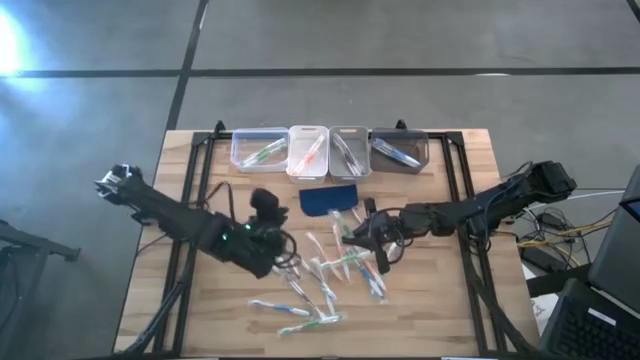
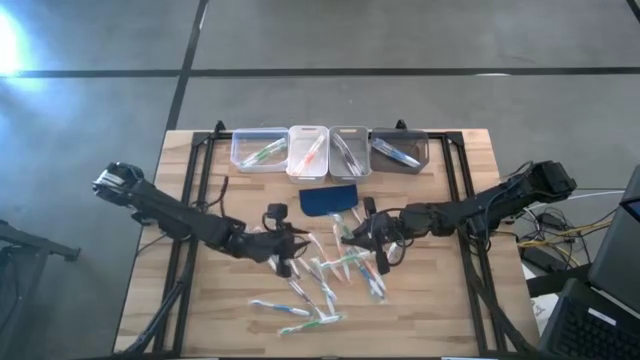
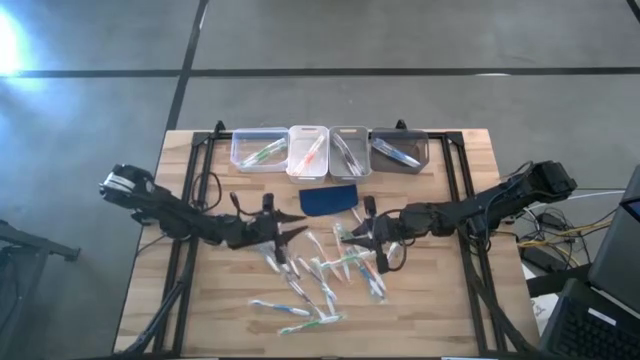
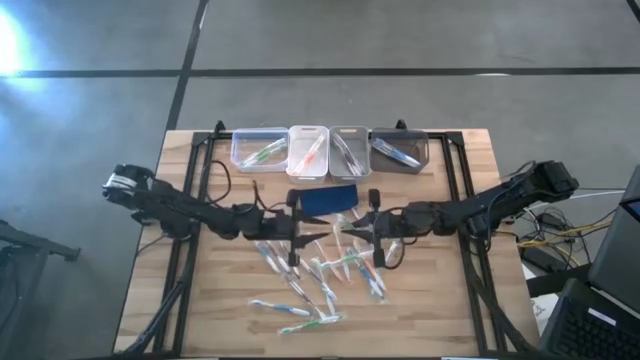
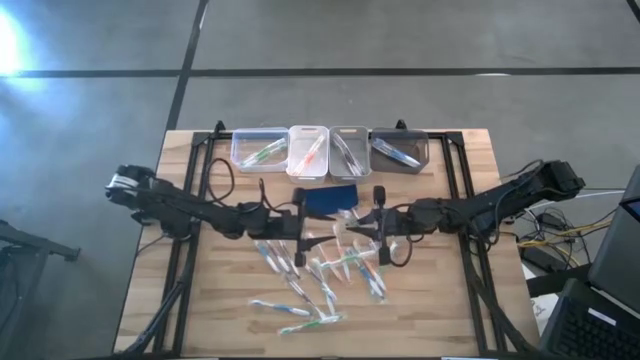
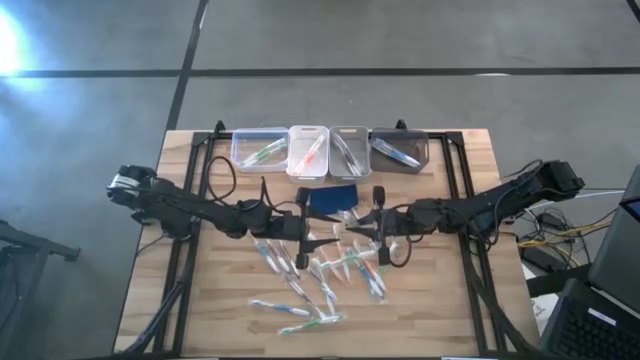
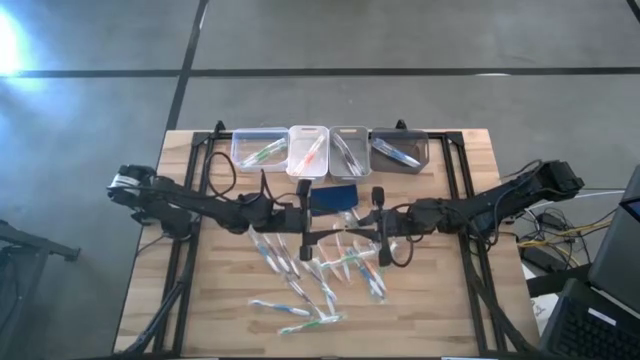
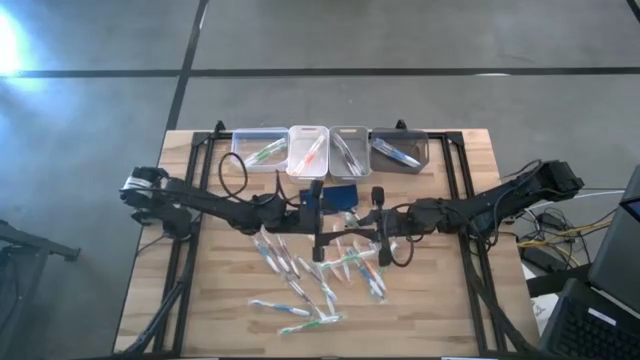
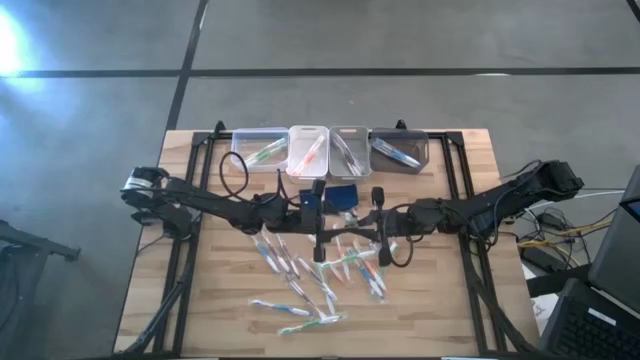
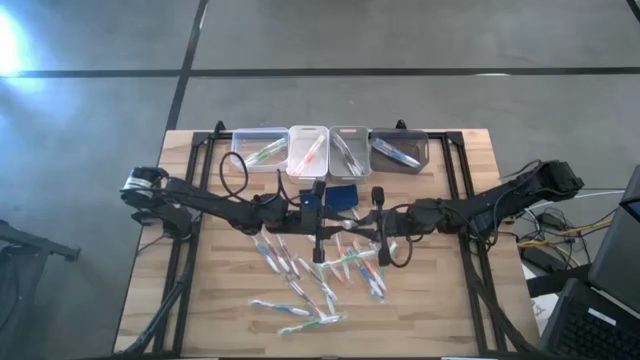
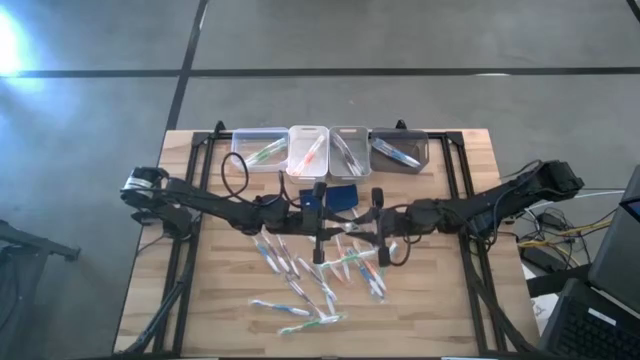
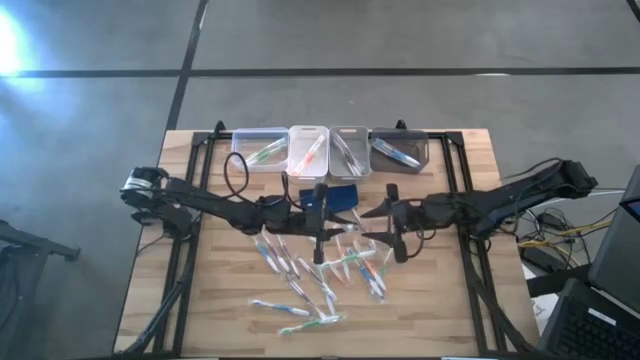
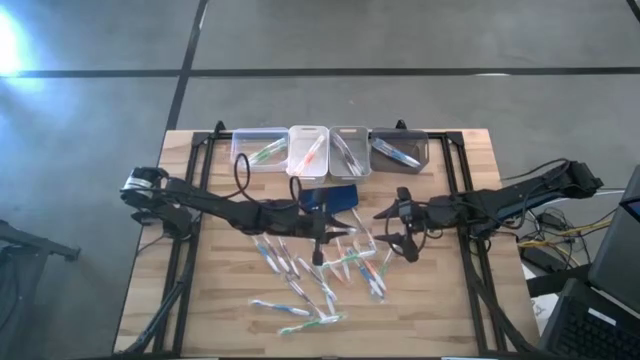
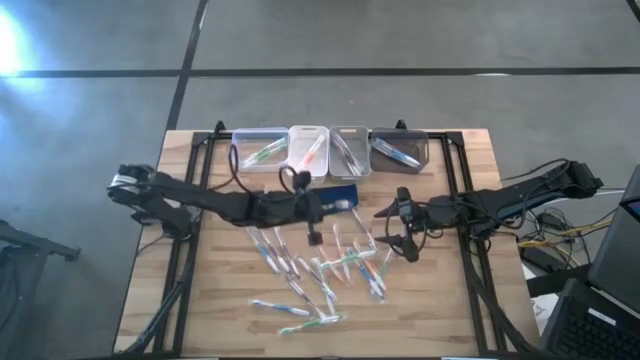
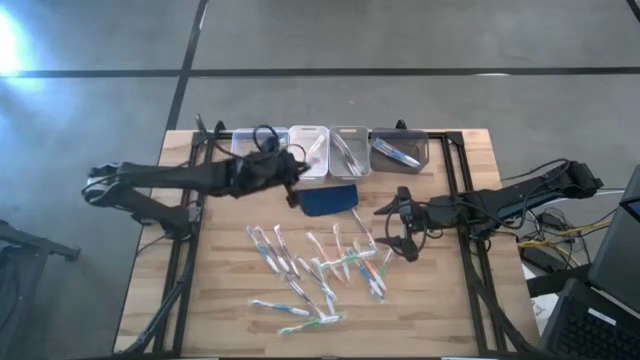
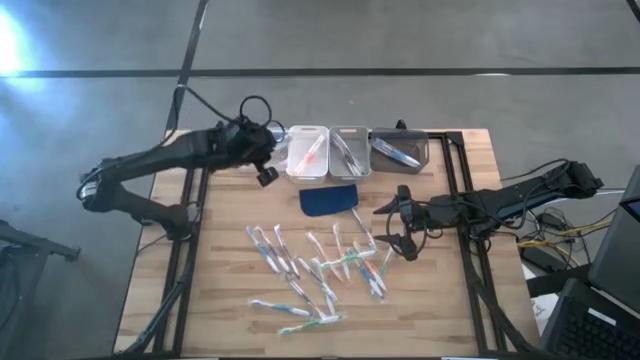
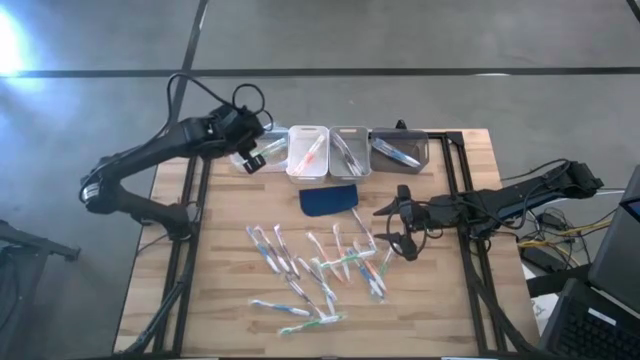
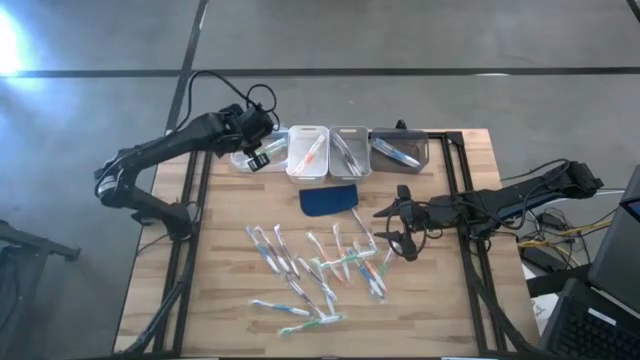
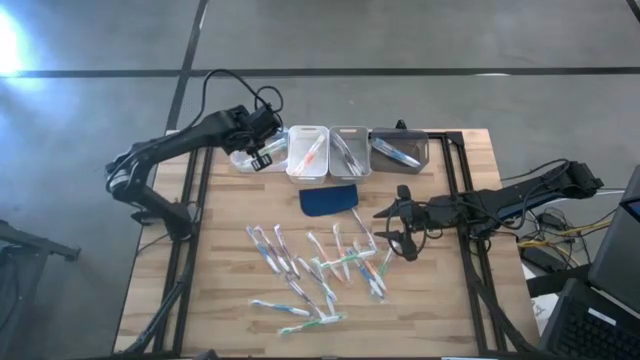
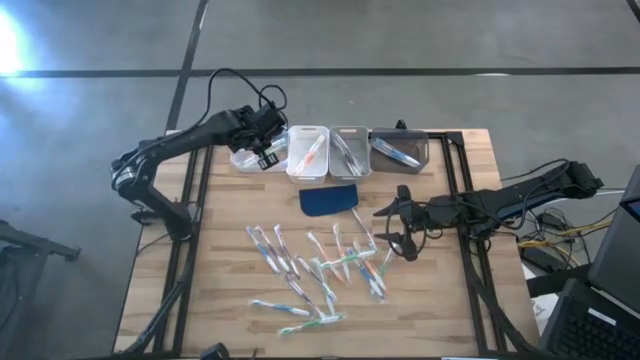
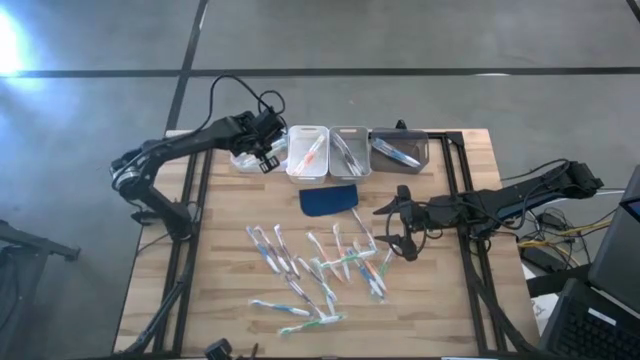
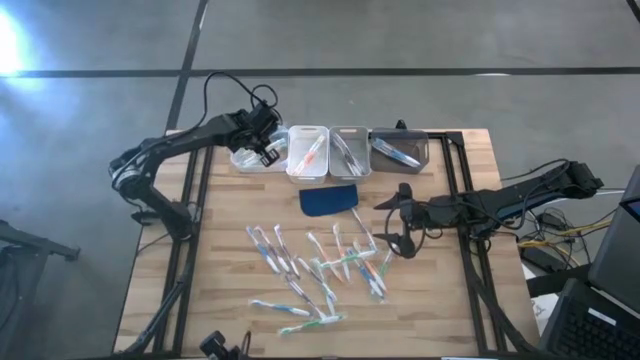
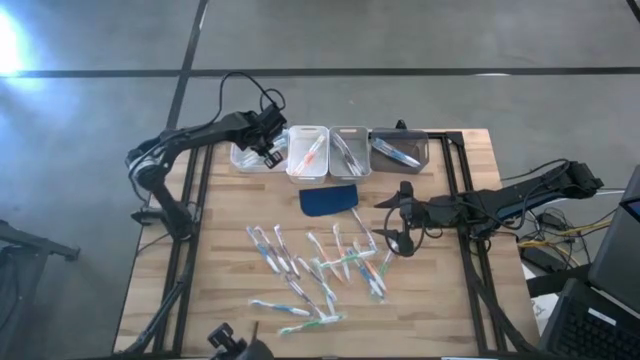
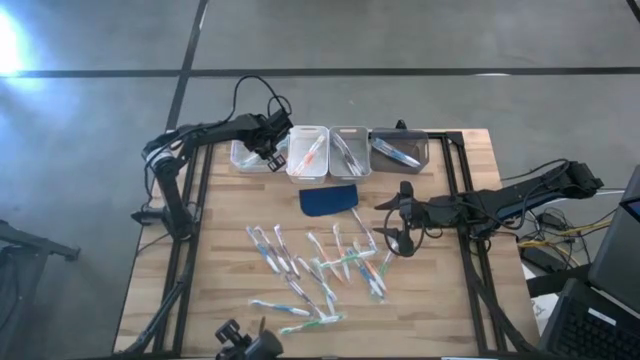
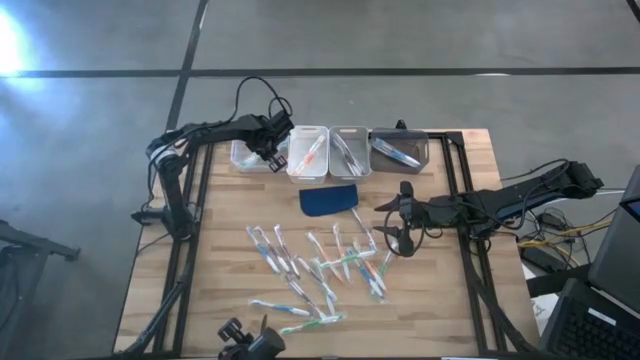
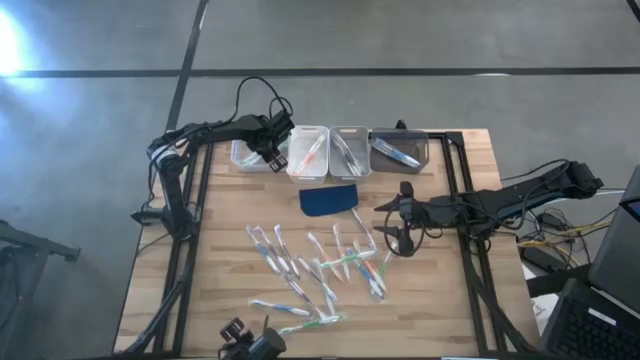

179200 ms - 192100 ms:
Task: Pick & Place Toothbrushes
Put the green toothbrush into the transparent bin

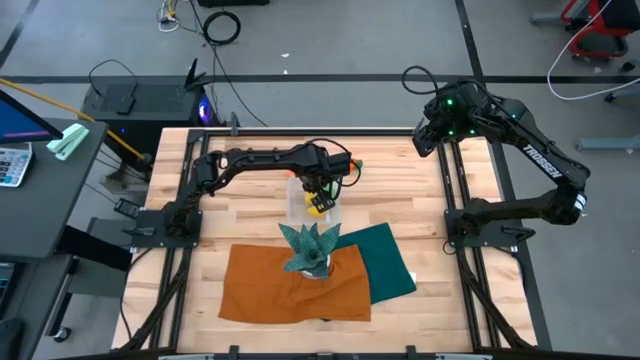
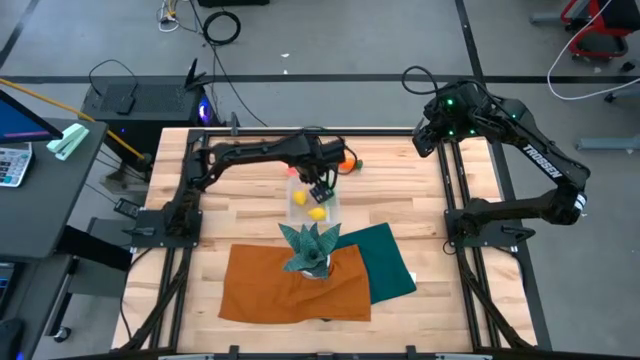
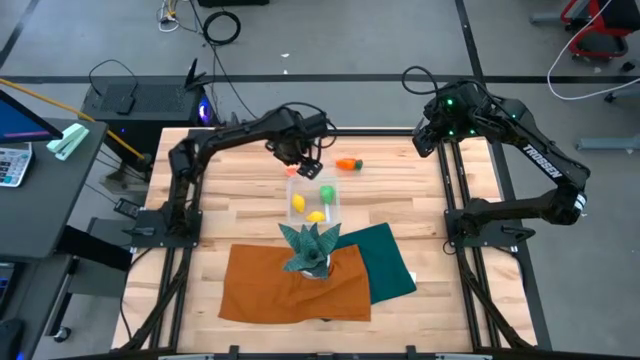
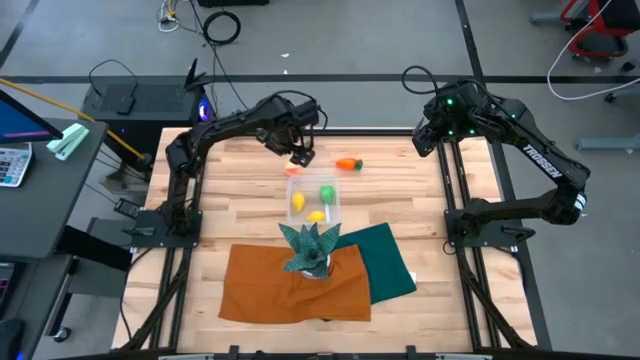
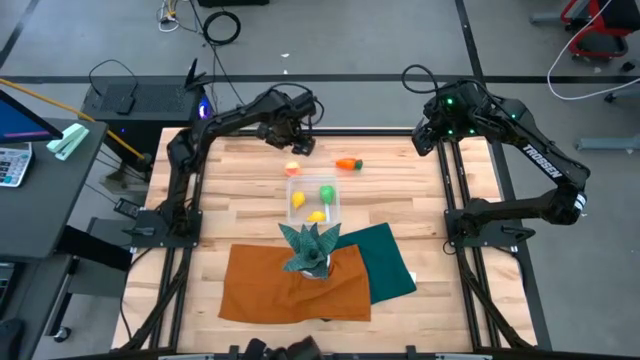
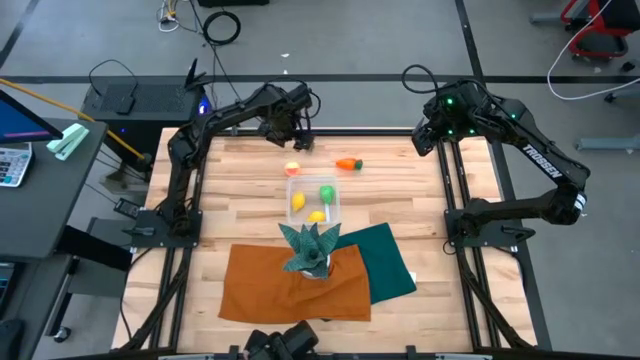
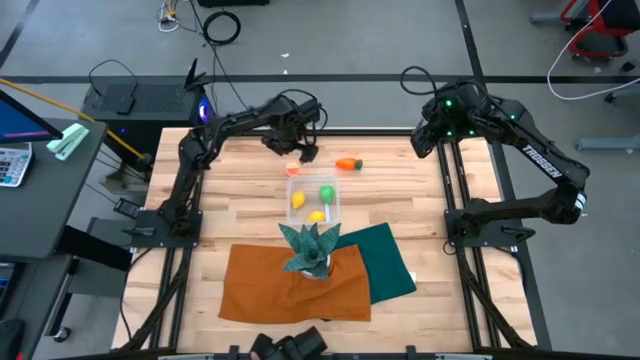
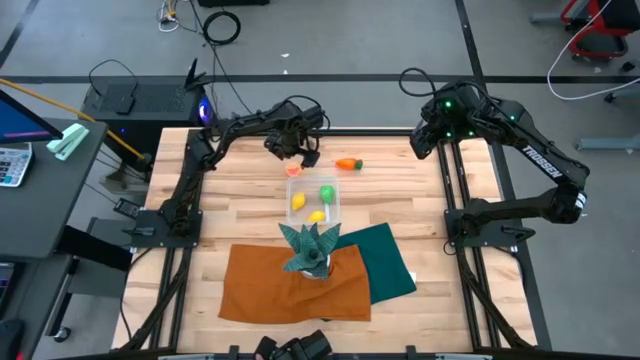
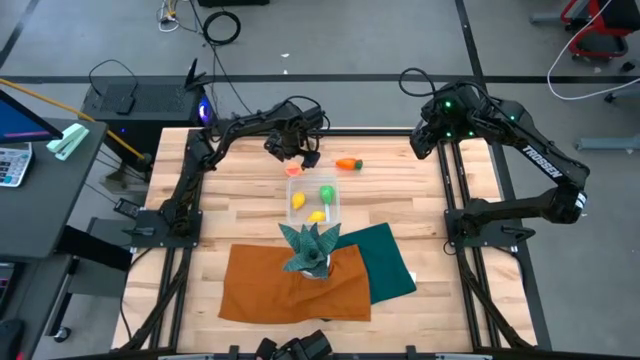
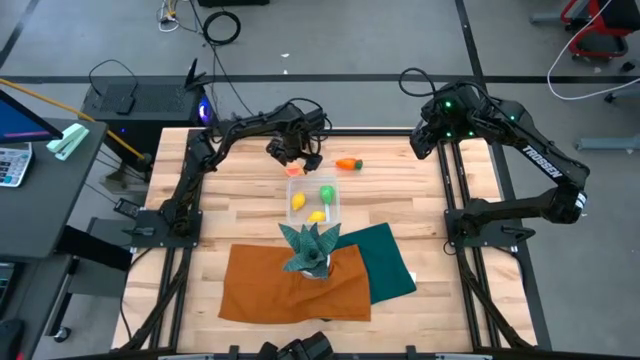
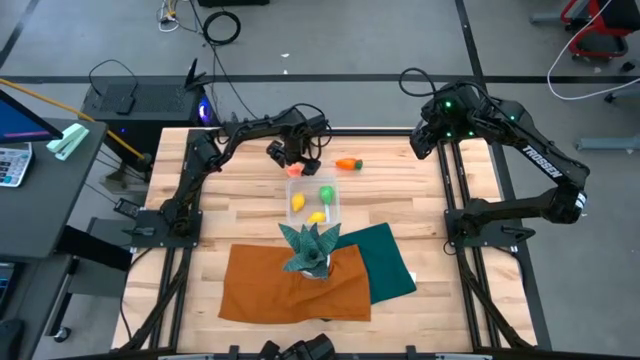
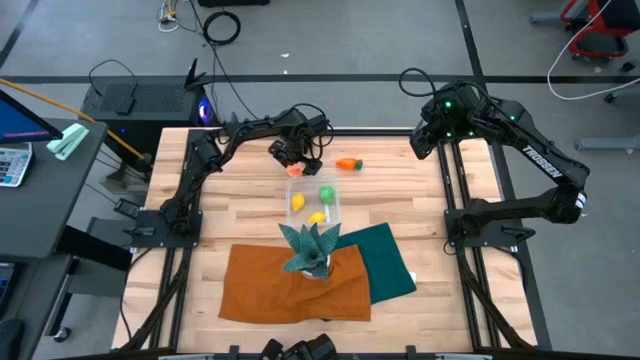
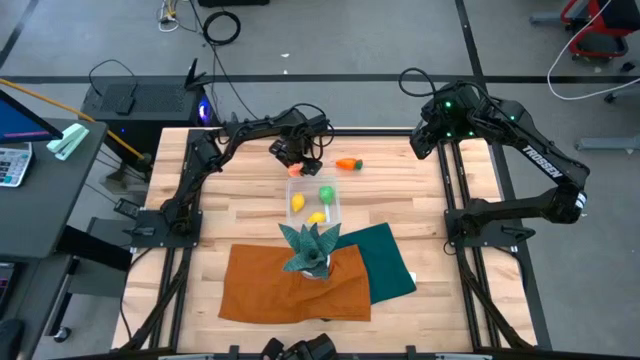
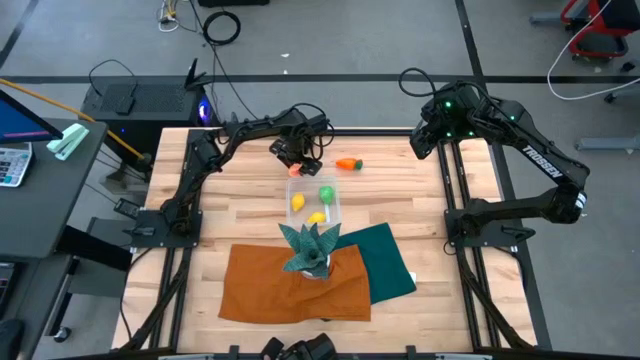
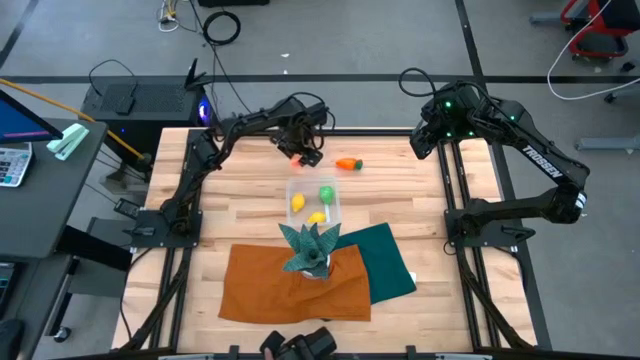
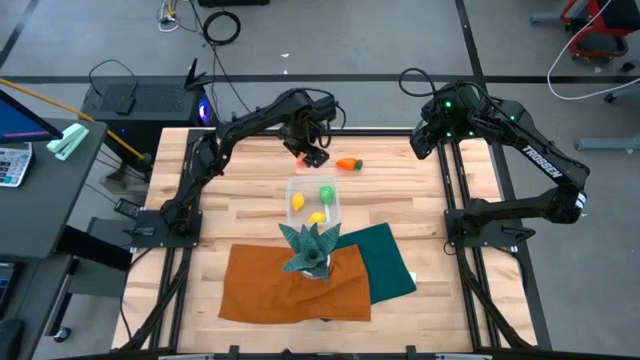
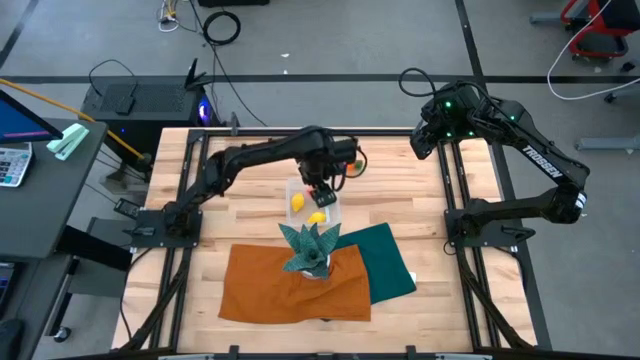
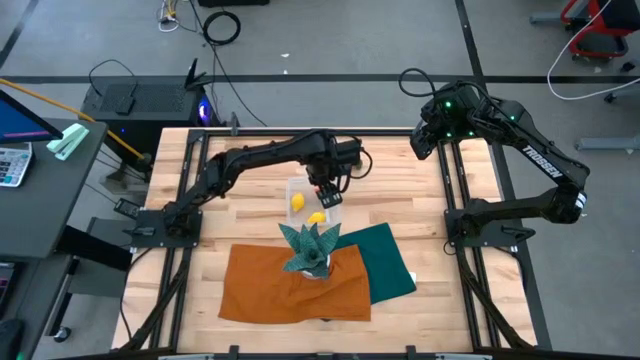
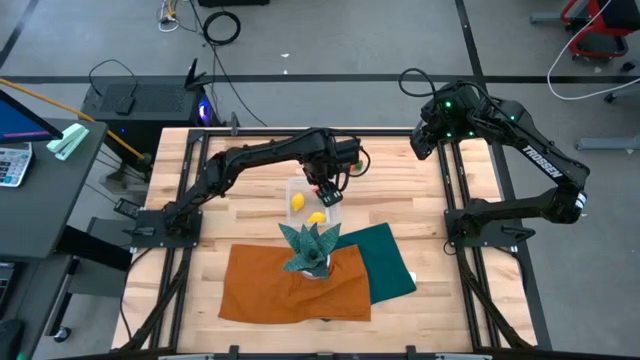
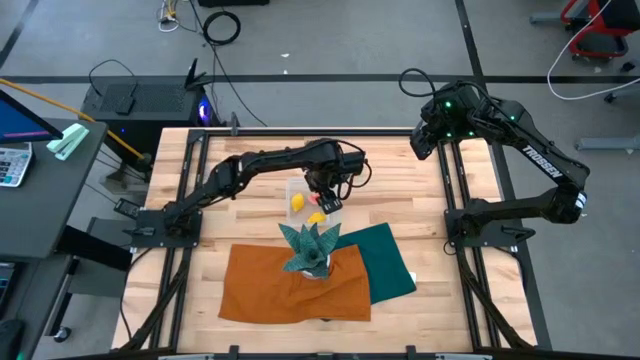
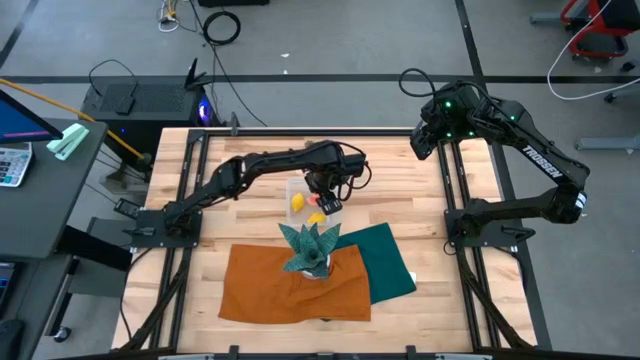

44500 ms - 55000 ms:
Task: Pick and placing Produce into tupperware
Put the orange peach into the transparent bin
